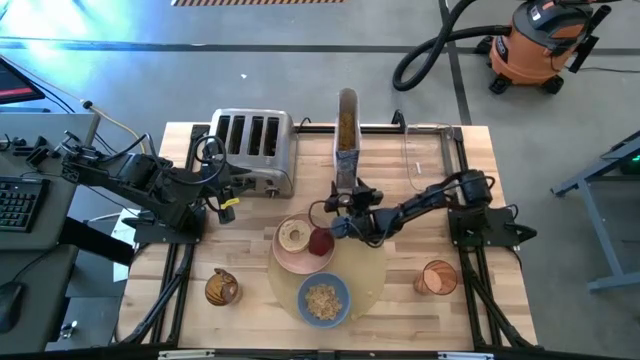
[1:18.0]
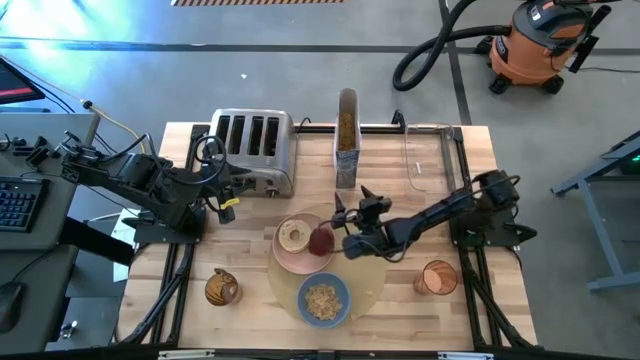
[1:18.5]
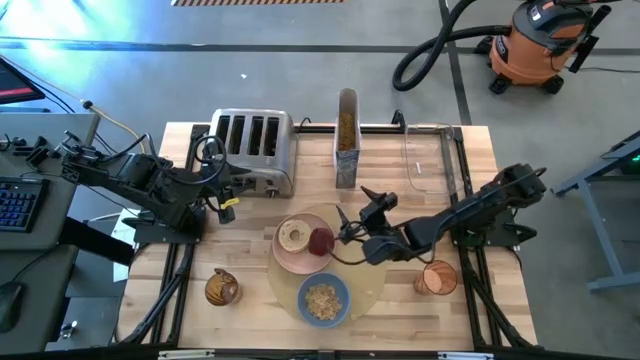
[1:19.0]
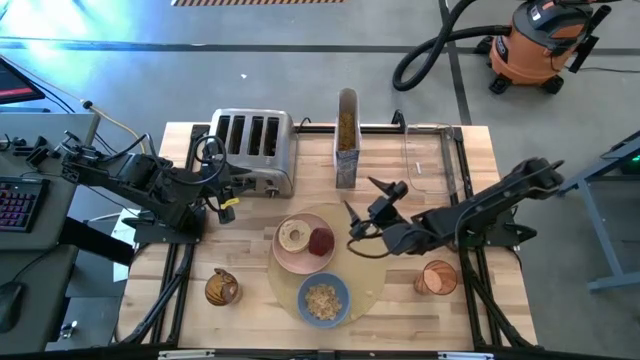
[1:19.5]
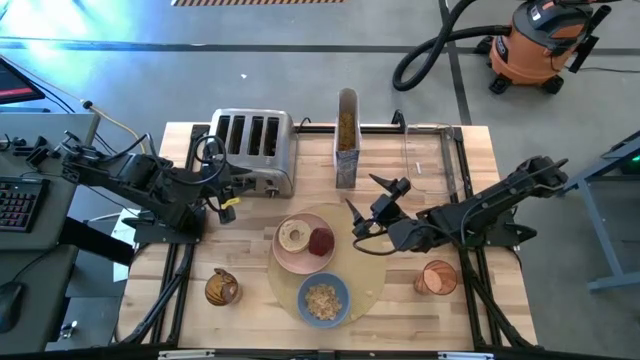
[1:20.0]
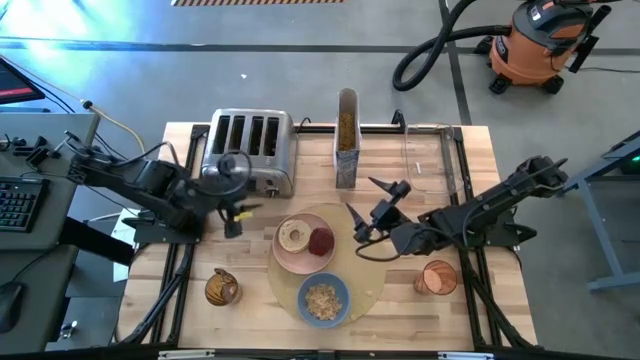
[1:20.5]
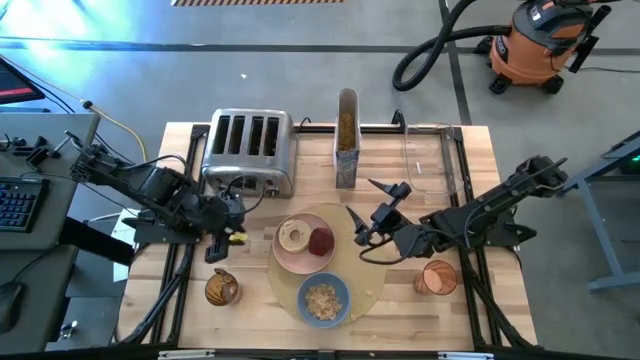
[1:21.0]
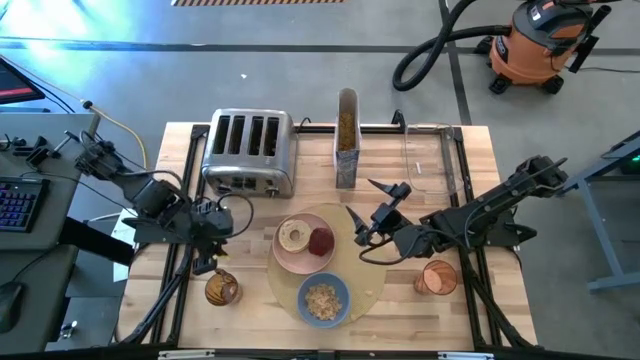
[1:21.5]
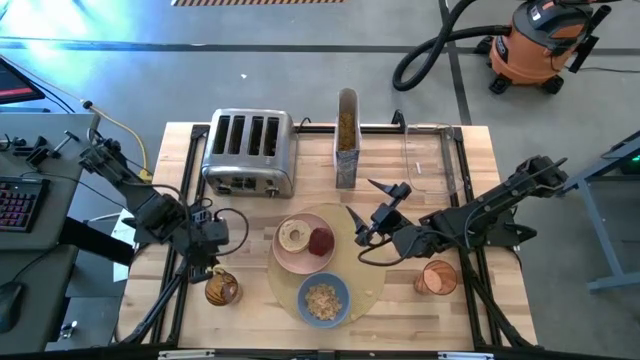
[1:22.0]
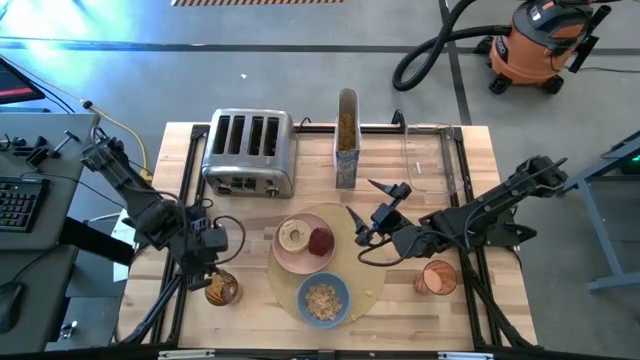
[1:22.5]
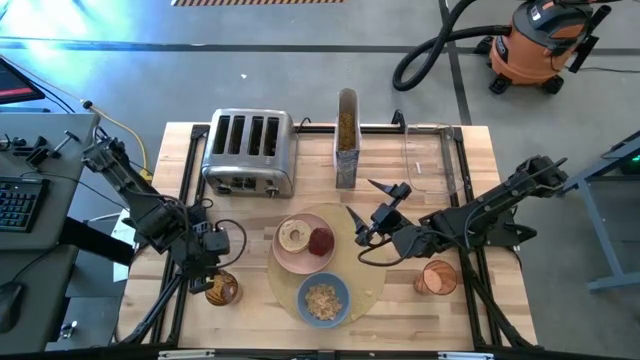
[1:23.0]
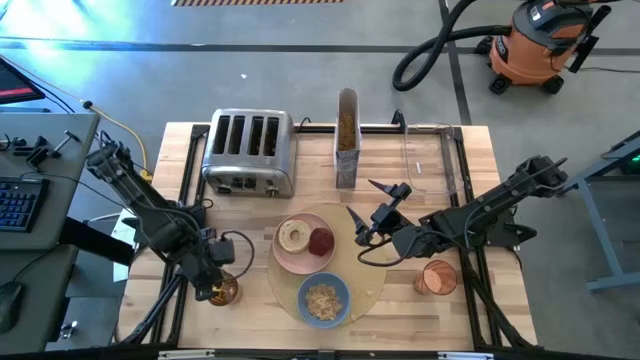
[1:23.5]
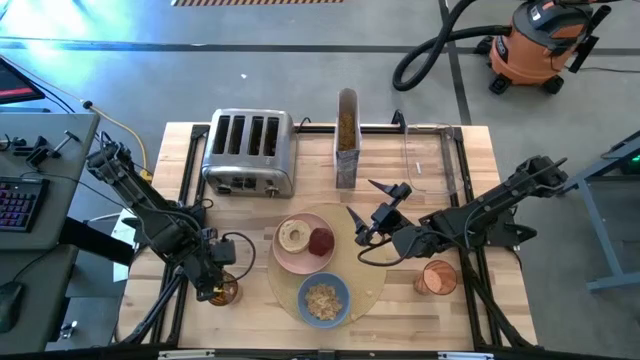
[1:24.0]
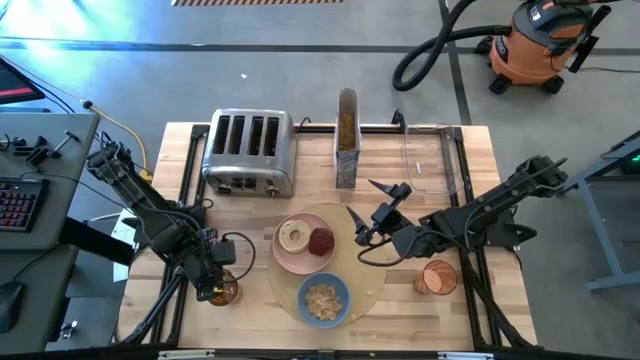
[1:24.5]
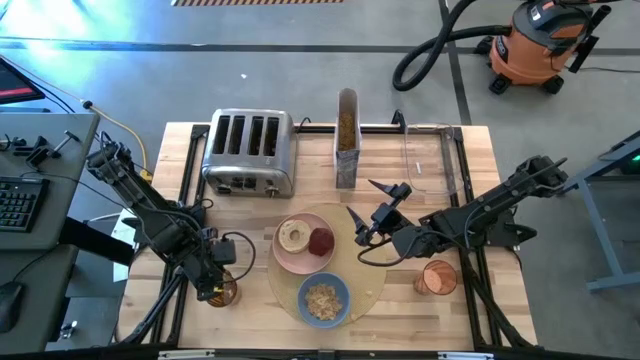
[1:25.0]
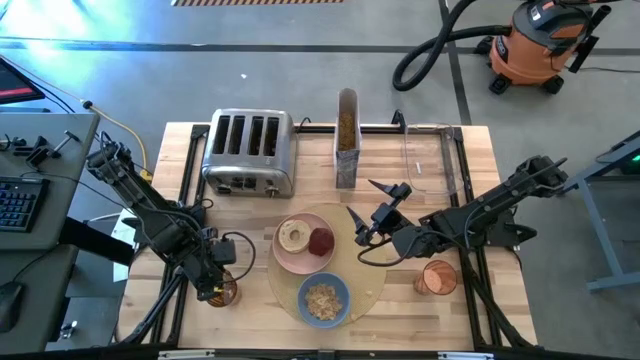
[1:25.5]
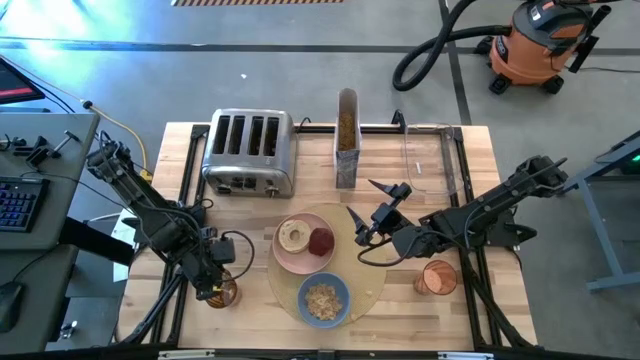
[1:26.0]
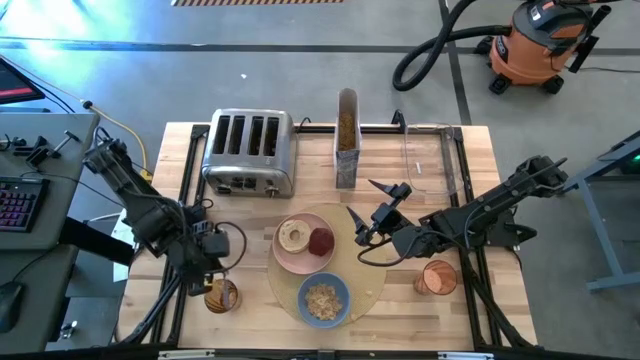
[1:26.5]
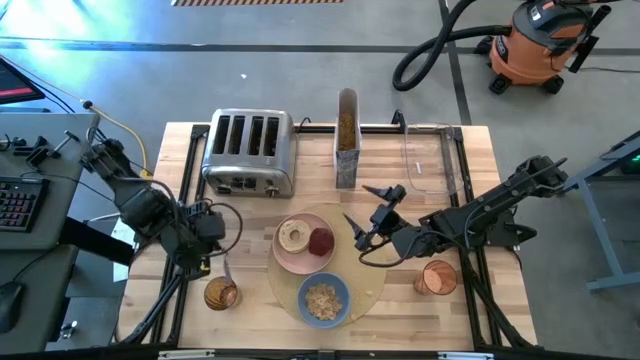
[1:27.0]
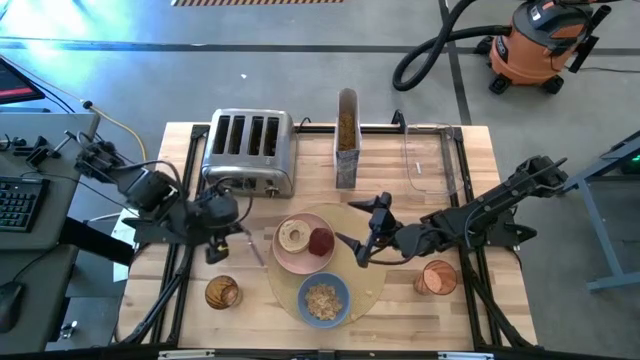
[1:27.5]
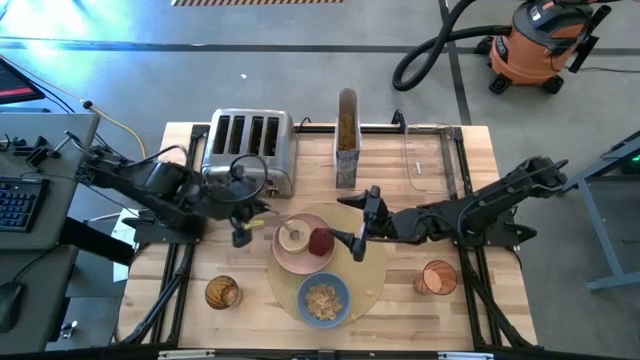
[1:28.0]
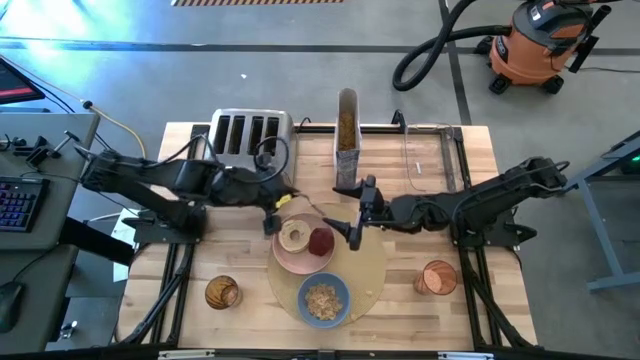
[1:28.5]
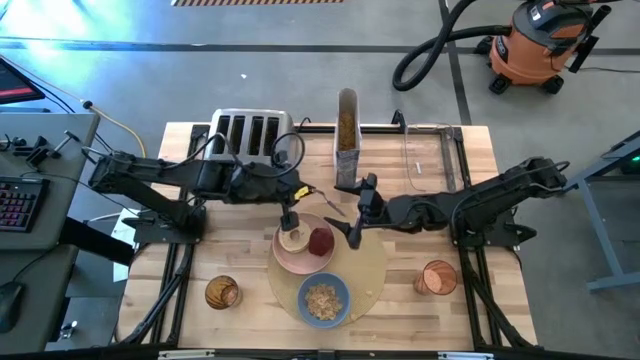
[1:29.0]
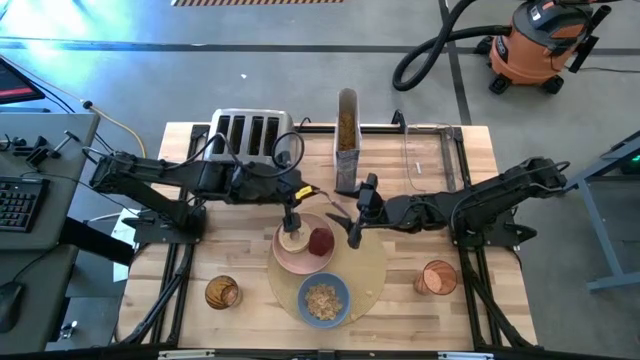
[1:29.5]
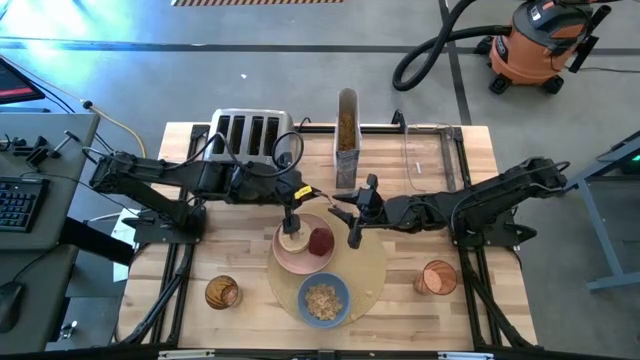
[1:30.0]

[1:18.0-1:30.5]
Task: Arrange a breakfast setting
Put the spoon on the brown tablemat to the right of the blue bowl

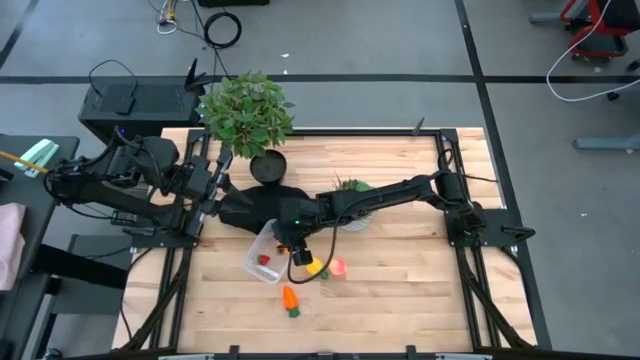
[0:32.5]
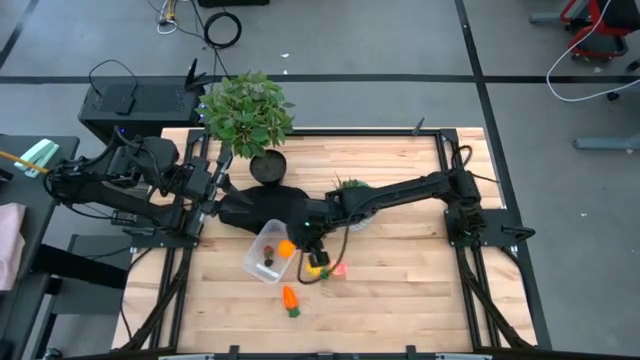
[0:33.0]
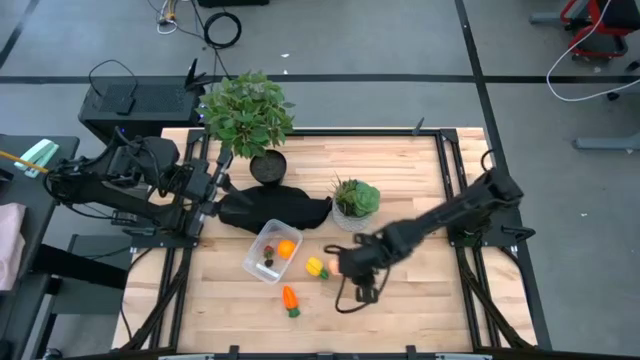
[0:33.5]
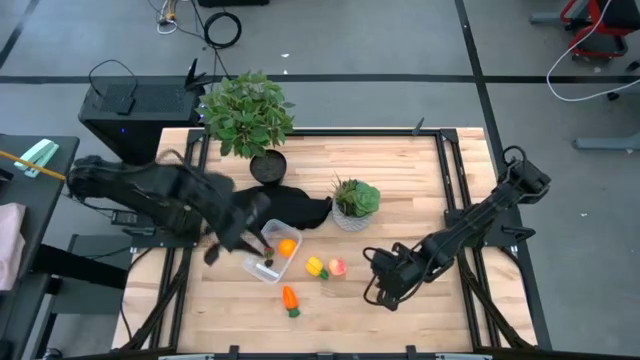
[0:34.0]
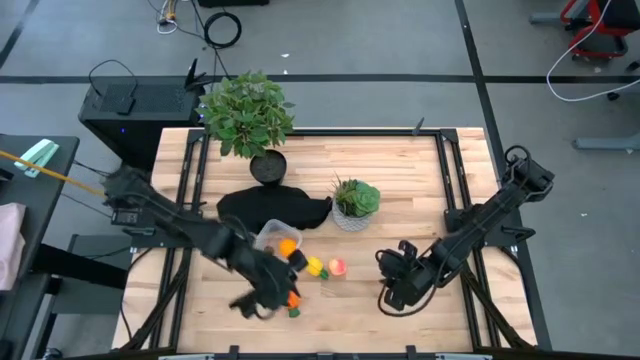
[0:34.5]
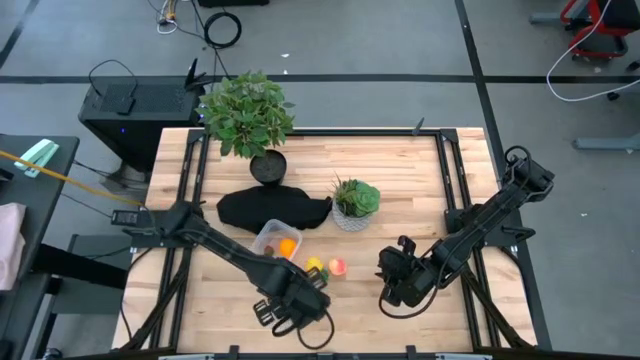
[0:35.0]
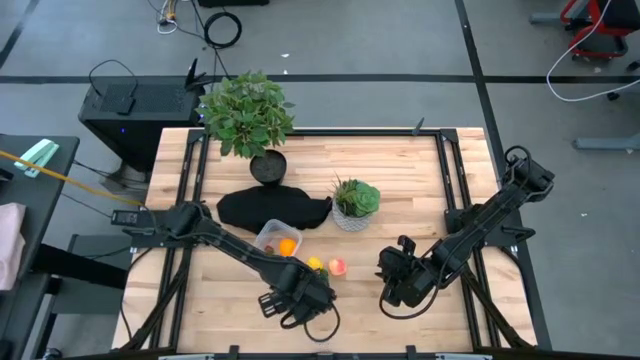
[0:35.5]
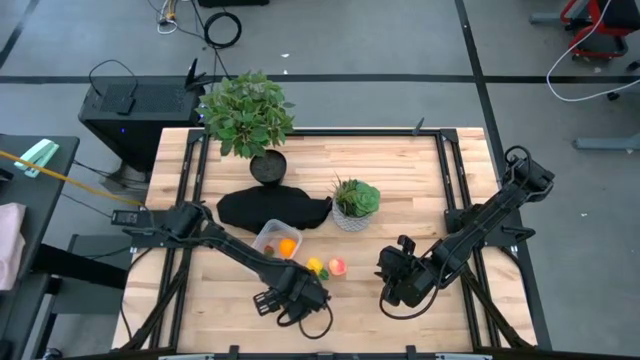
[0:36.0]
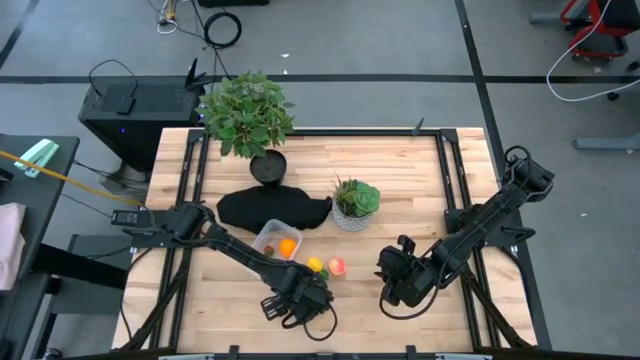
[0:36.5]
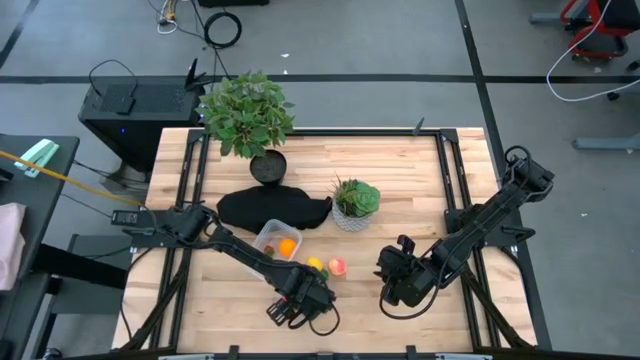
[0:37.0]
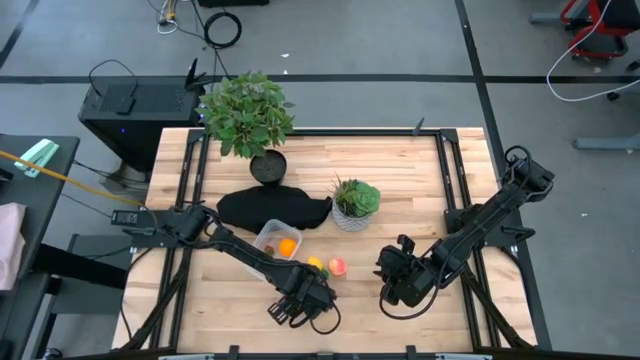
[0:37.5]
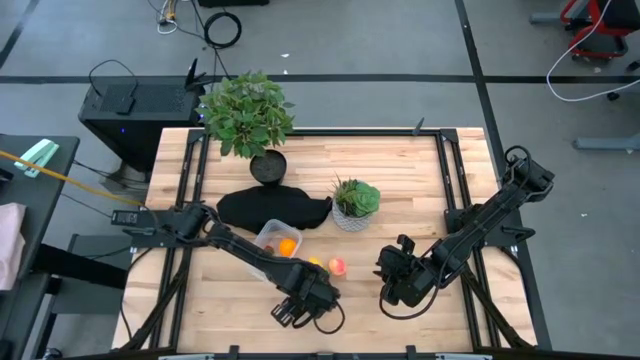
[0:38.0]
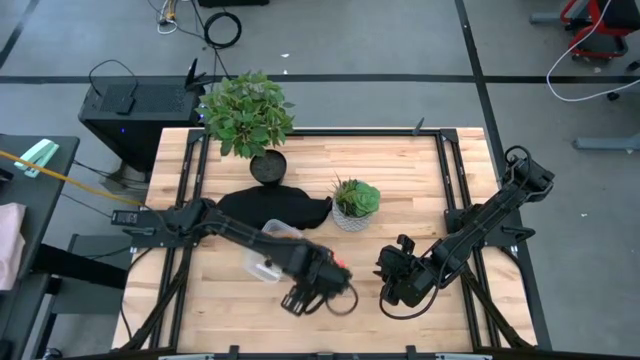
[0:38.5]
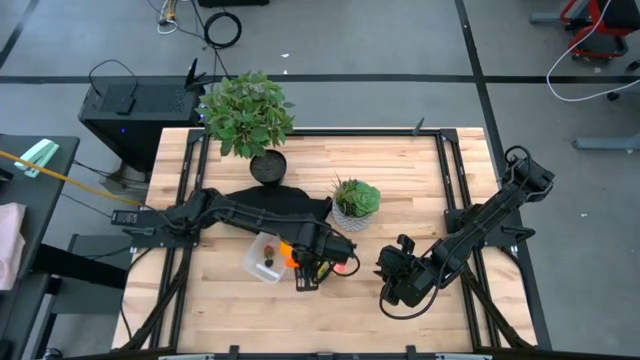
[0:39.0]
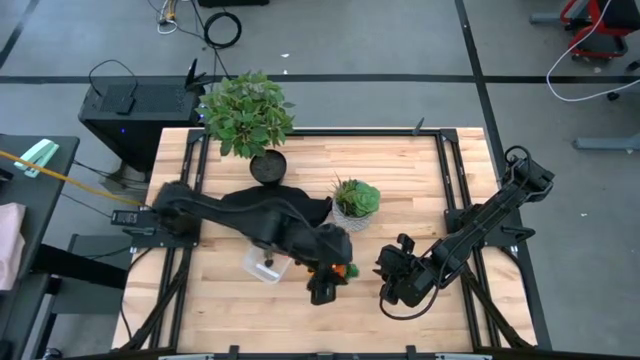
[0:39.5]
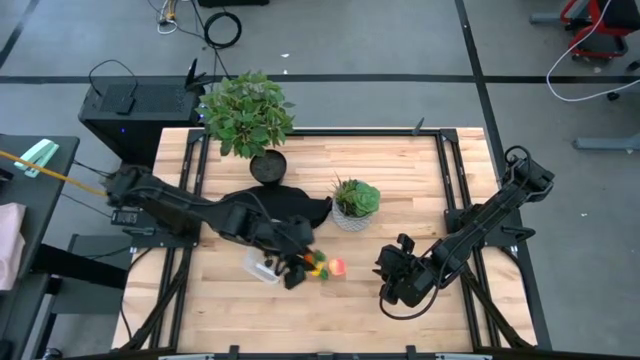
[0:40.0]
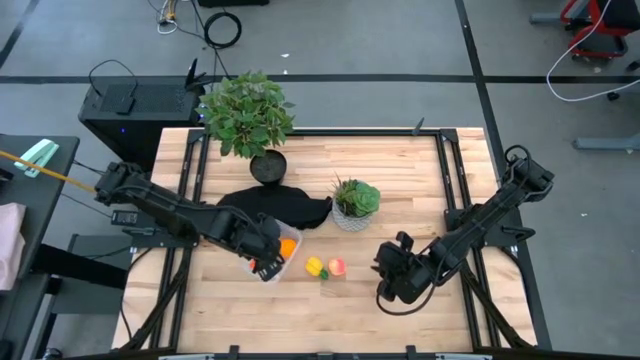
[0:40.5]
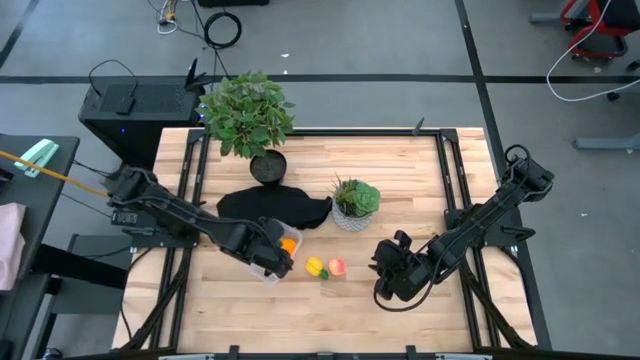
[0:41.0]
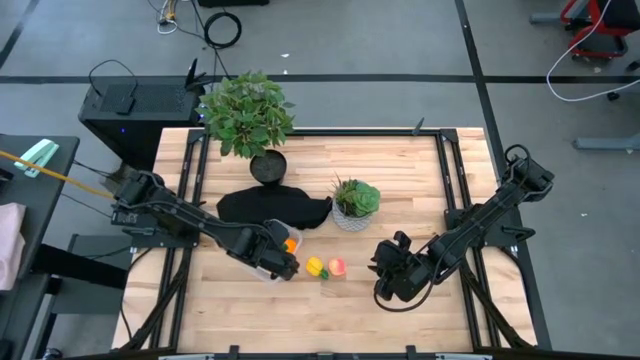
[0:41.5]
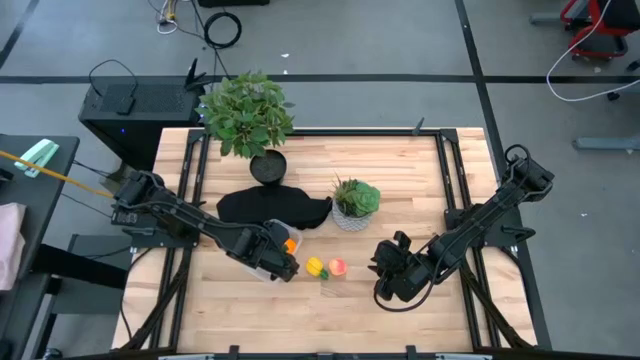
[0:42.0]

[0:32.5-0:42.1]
Task: Pick and placing Produce into tupperware
Put the carrot into the transparent bin
